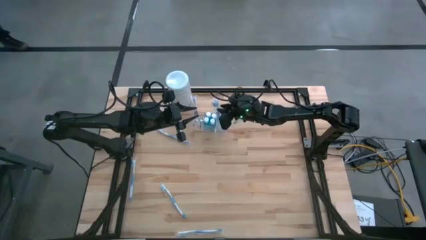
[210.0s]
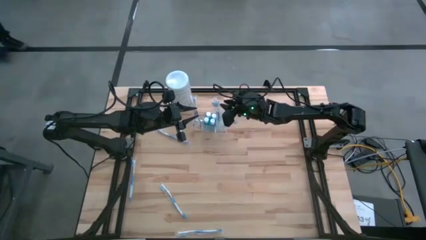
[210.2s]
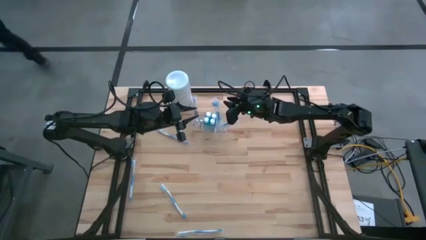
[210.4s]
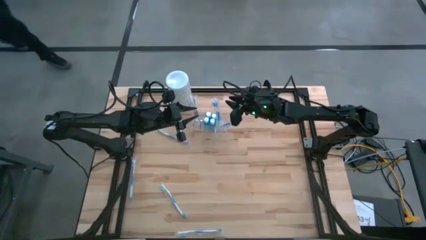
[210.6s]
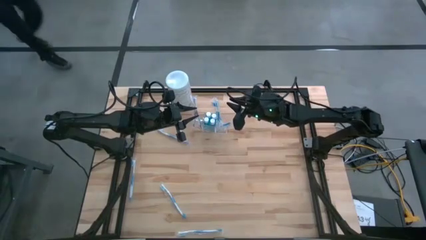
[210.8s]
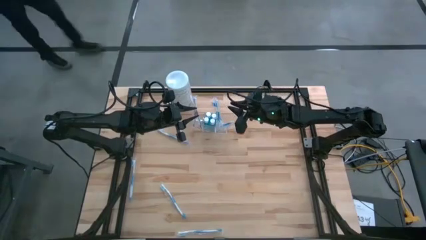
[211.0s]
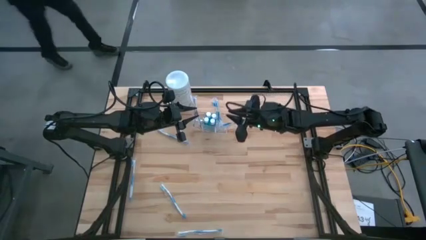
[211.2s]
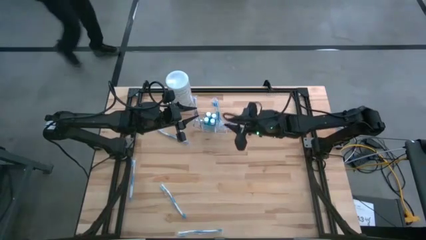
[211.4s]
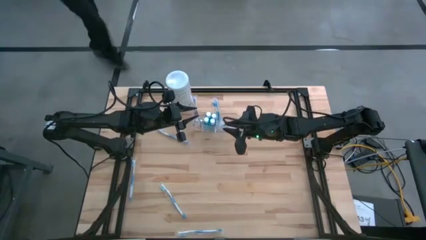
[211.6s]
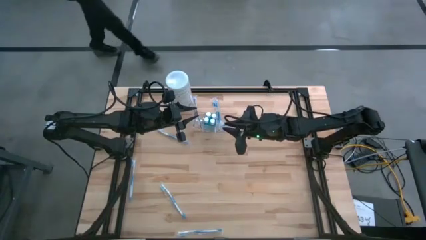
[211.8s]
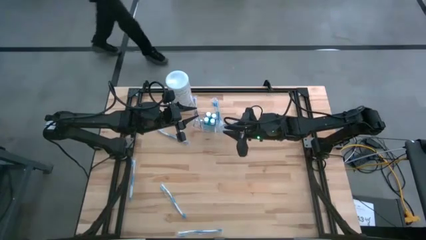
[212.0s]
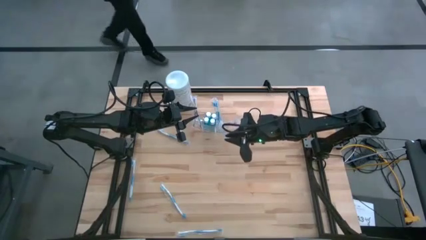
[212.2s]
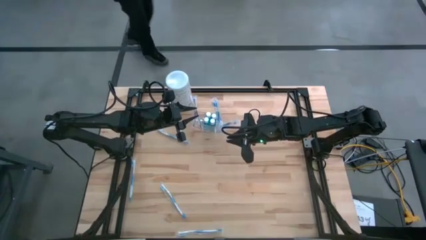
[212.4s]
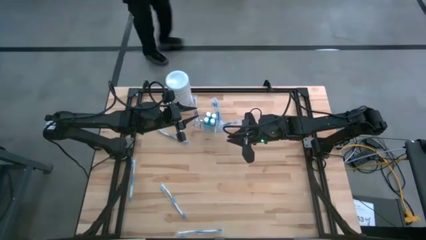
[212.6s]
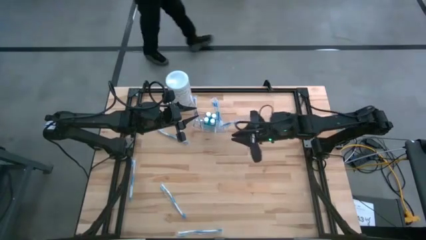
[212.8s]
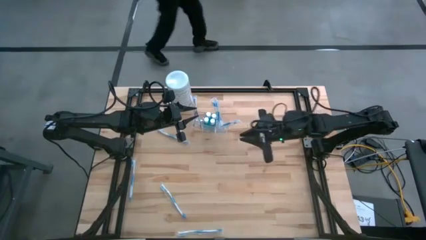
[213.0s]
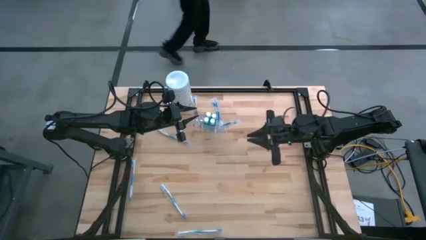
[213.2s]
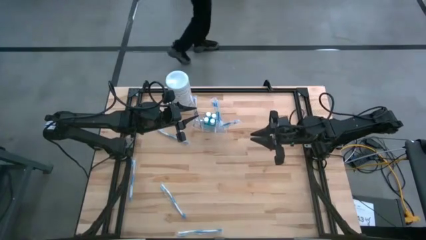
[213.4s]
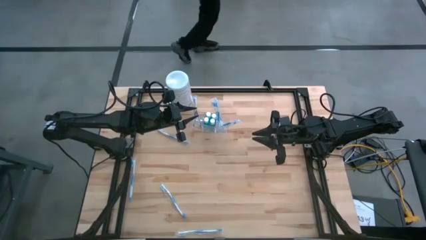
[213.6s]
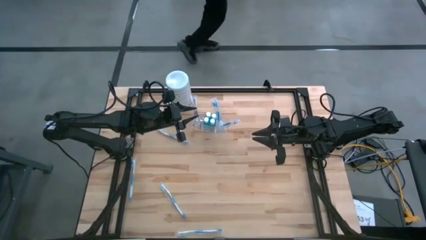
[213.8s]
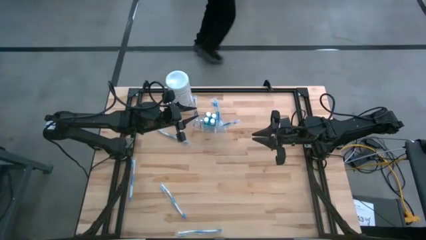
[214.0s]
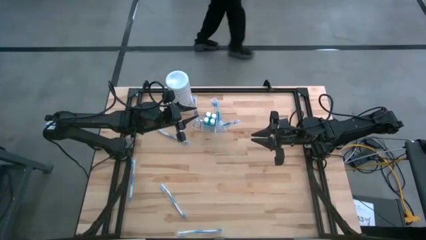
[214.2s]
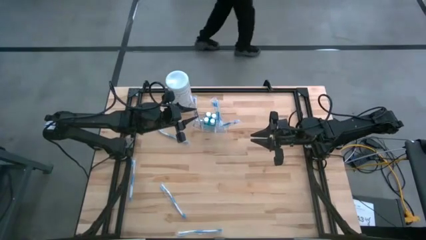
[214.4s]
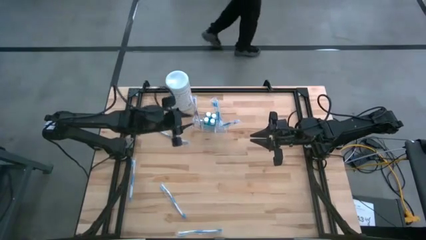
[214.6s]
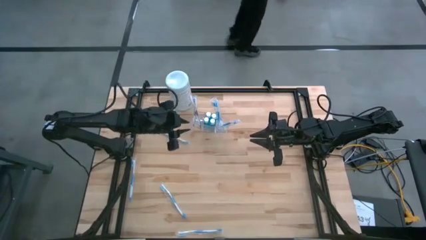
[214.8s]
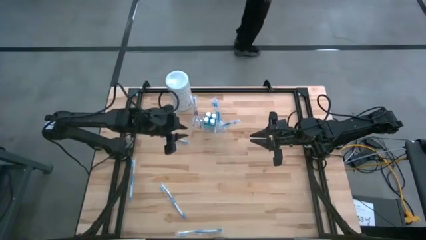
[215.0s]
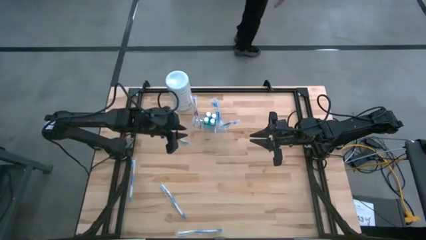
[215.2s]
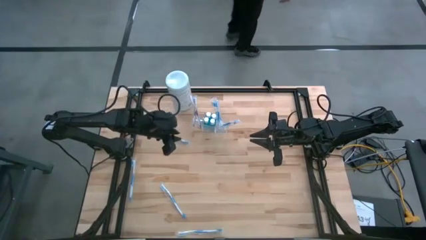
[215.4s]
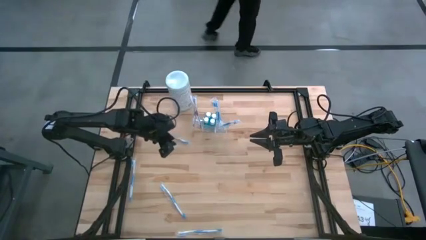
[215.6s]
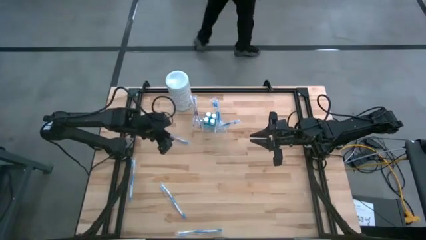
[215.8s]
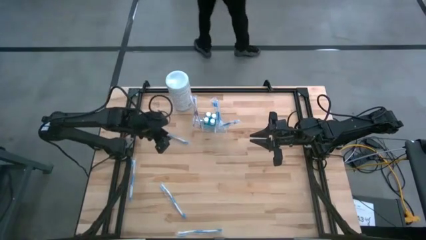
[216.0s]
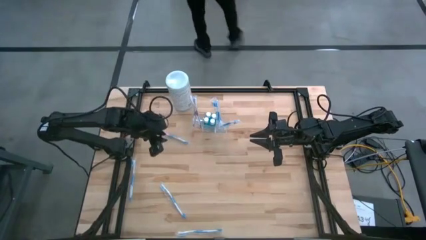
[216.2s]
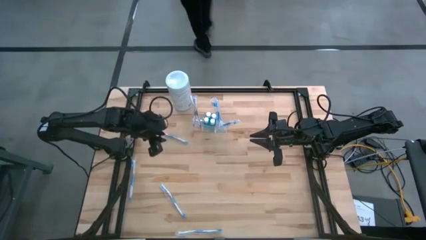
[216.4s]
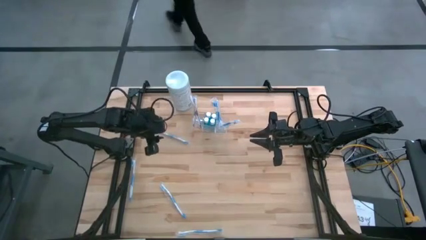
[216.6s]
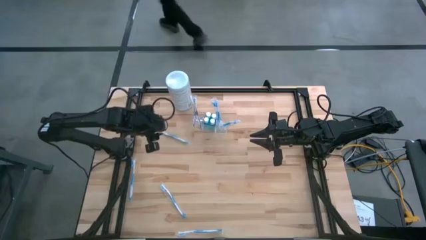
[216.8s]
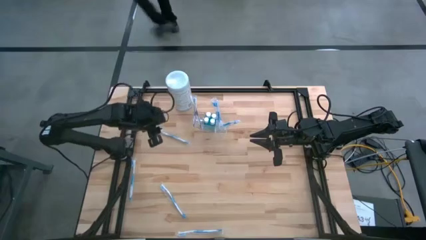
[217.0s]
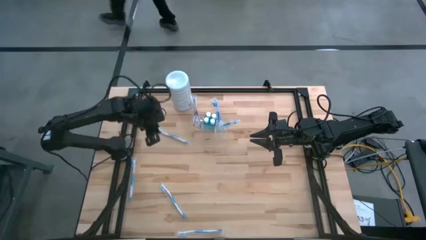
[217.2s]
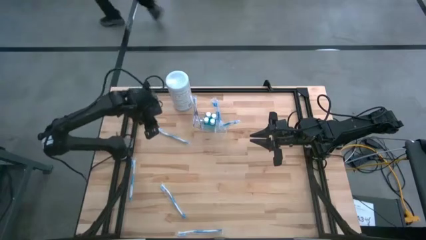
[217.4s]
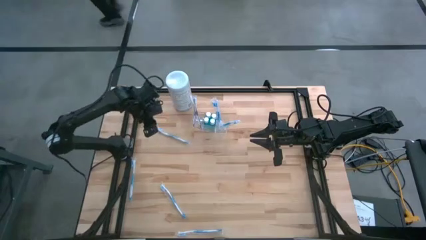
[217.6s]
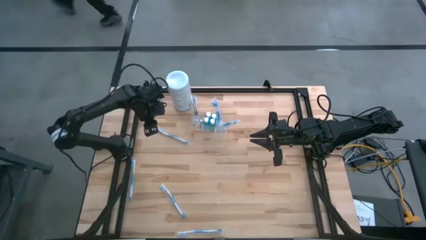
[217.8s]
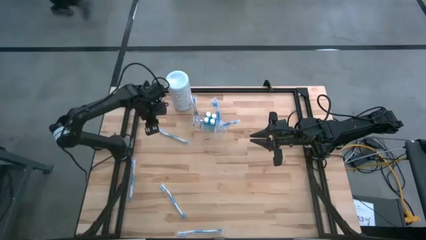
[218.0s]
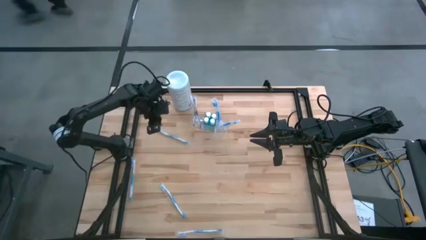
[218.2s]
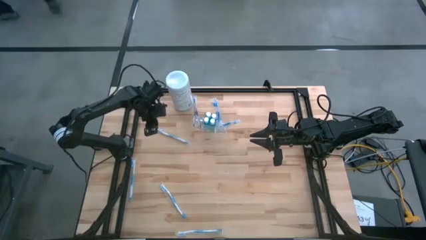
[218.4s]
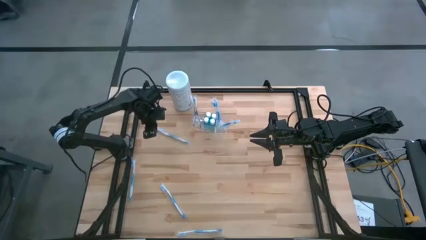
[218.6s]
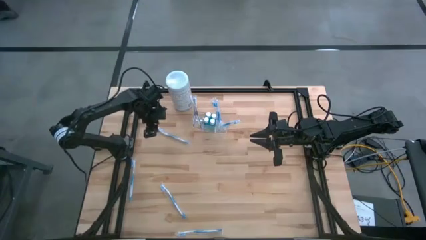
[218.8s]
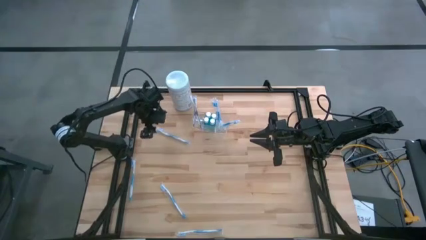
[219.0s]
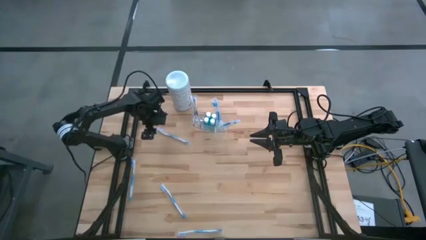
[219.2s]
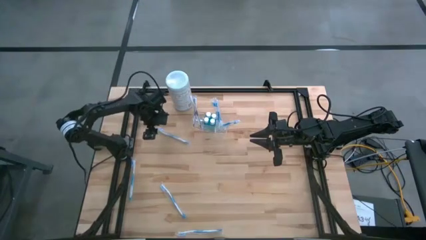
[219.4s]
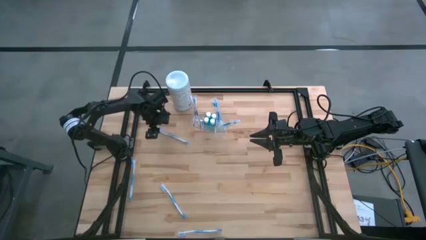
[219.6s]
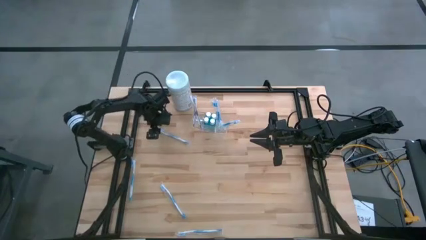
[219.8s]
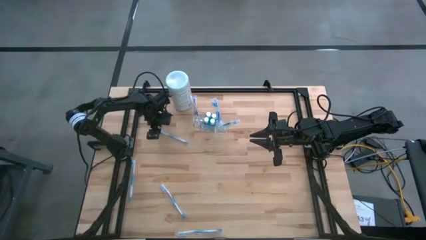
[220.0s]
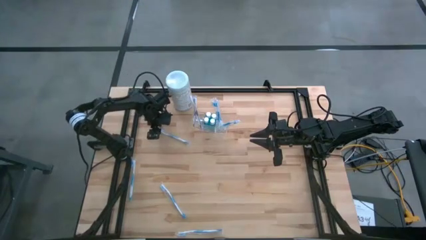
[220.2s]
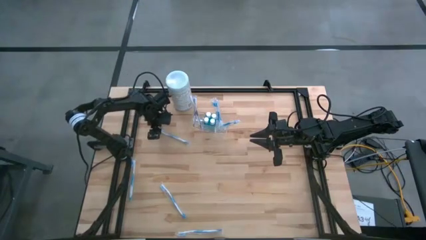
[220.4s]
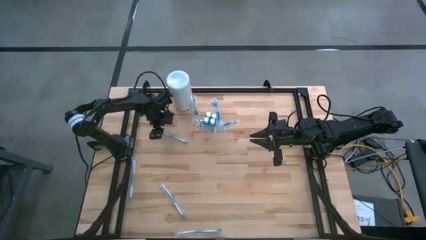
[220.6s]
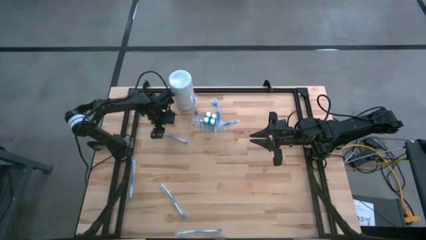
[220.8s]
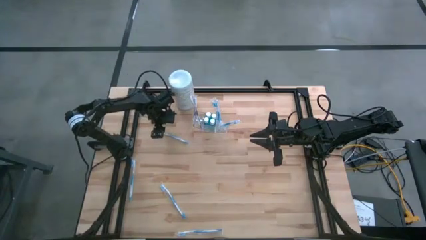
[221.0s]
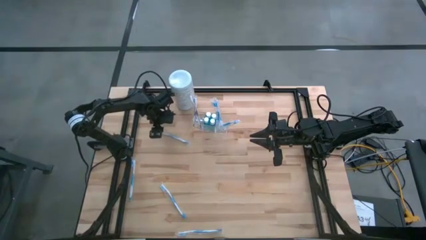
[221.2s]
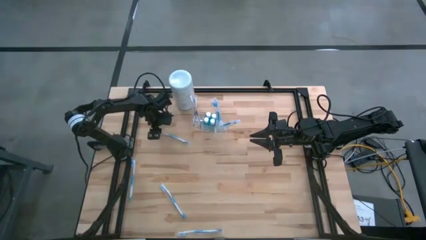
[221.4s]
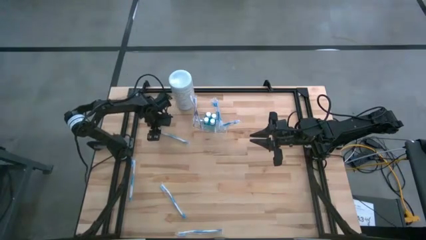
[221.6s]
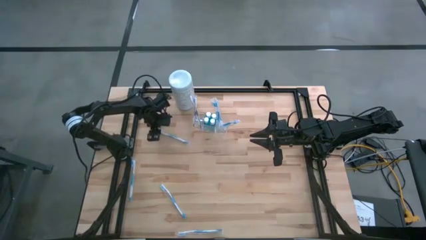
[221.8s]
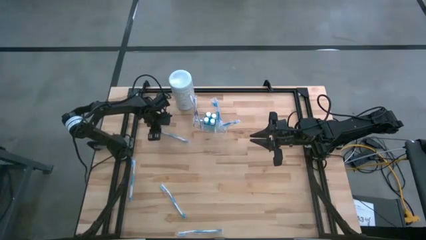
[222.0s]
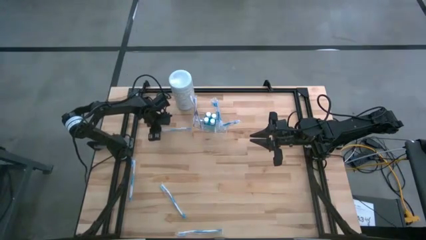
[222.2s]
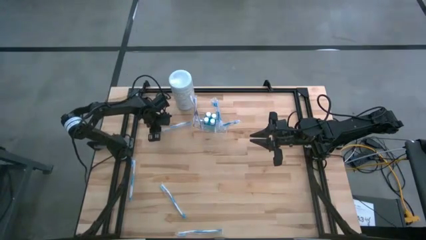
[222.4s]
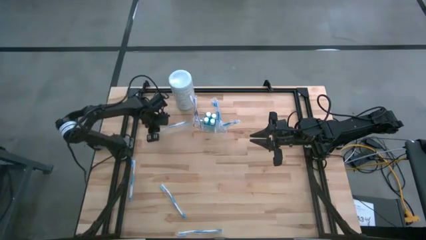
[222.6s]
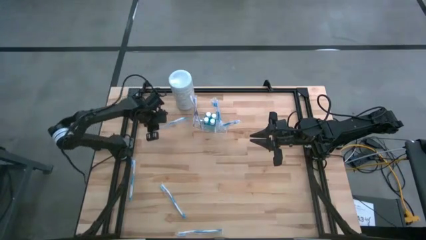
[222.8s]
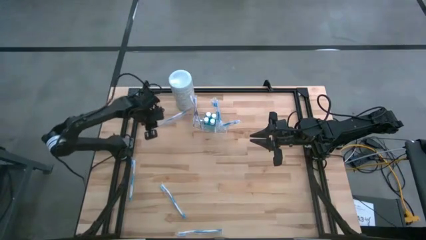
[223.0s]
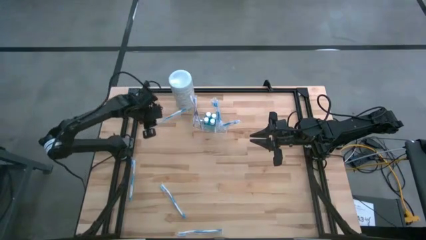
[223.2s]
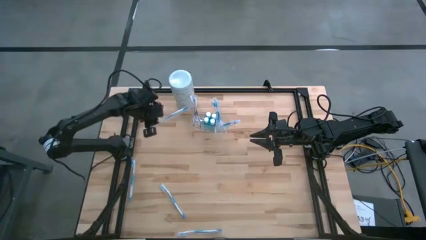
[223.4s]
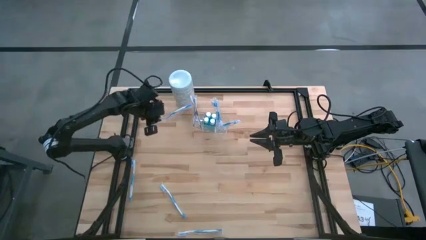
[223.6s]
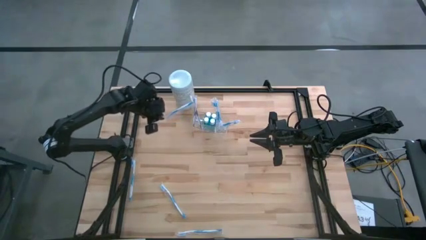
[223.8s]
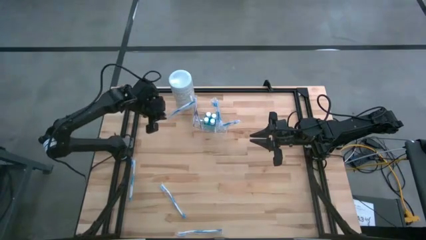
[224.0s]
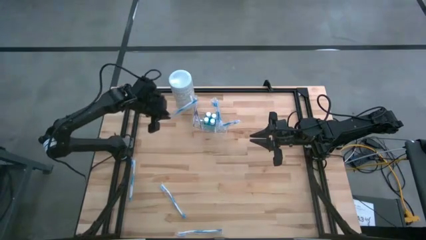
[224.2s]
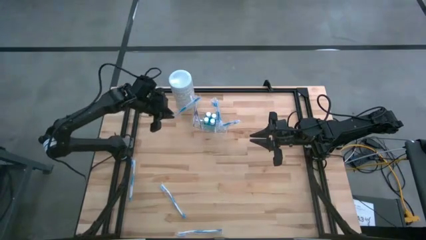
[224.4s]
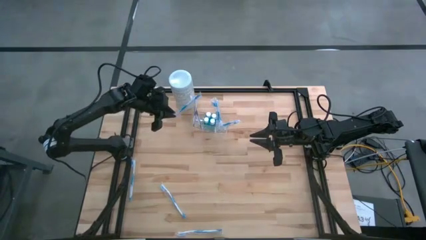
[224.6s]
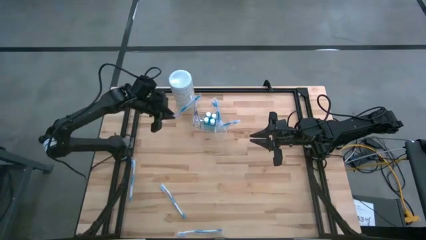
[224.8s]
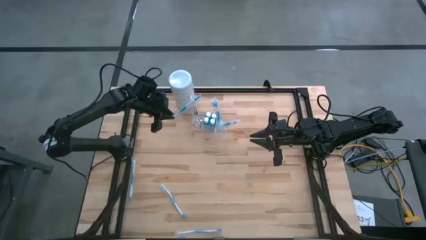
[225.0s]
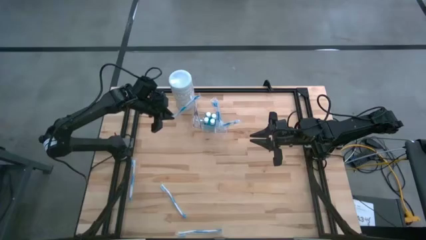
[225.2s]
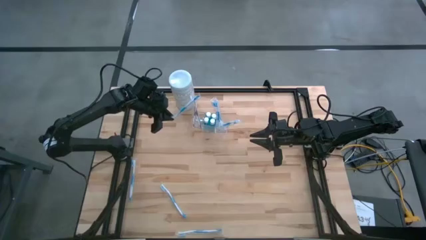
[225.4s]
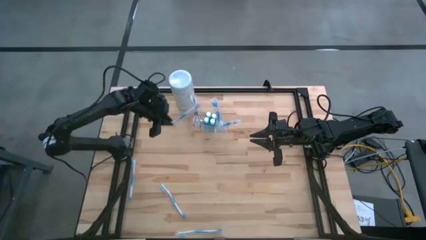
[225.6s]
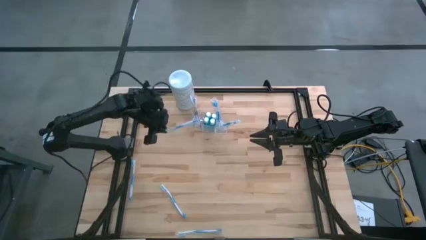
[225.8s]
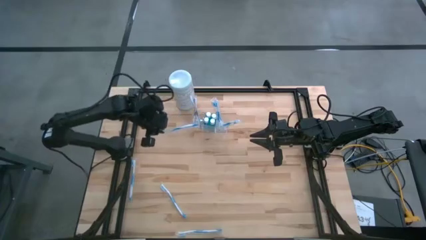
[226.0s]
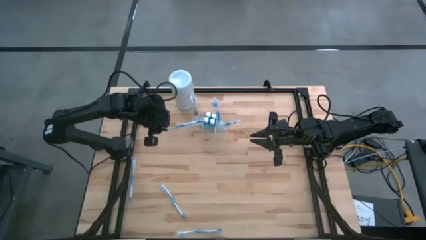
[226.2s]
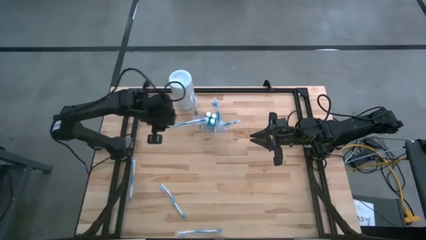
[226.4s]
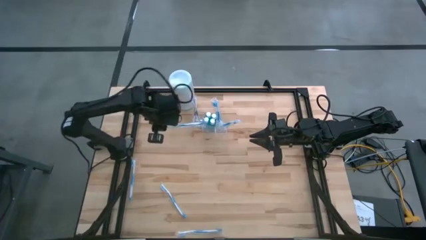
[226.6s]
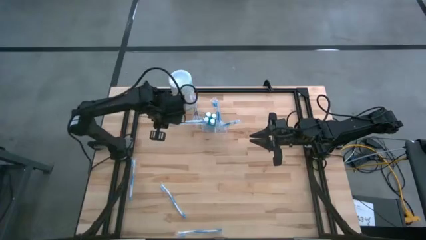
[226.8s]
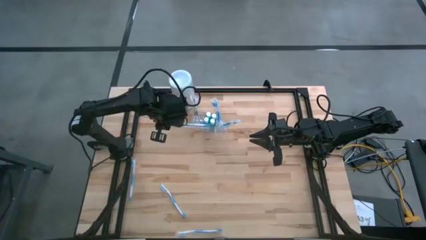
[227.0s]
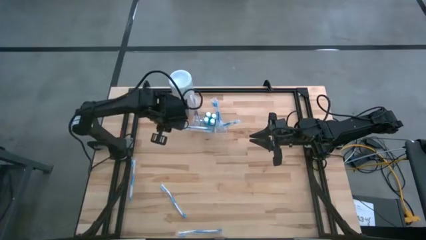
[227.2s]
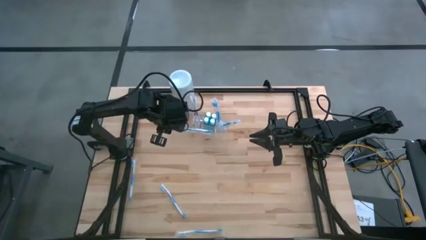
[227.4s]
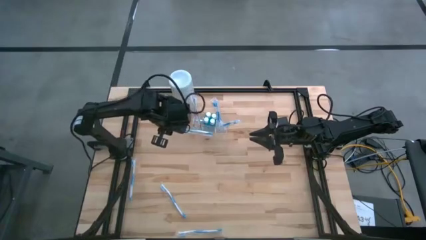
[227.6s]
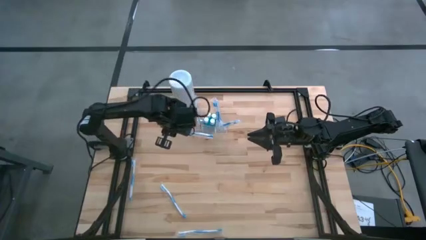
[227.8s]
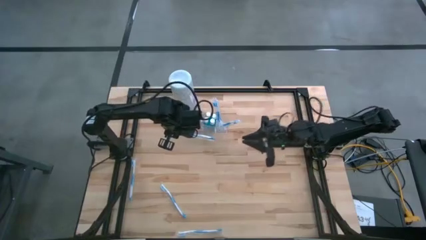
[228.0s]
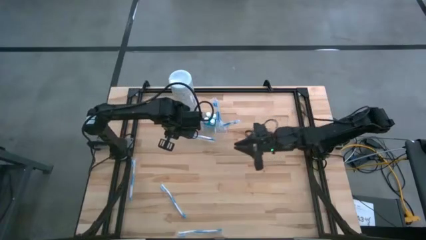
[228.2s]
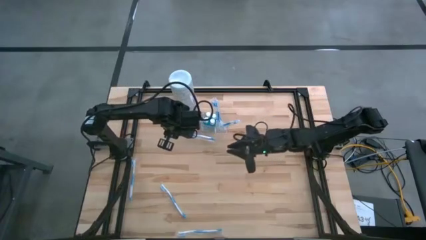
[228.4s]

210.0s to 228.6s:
Task: Pick & Place toothbrushing station
Put the blue toothbrush into the right of the transparent organizer
